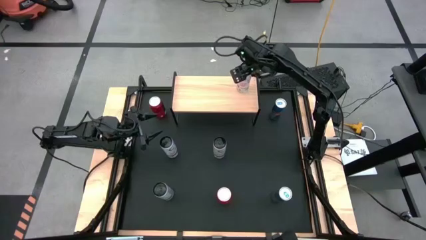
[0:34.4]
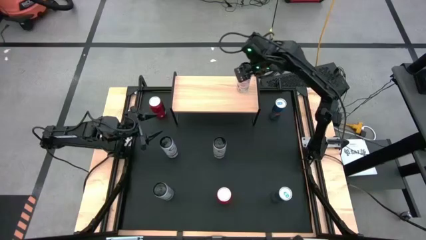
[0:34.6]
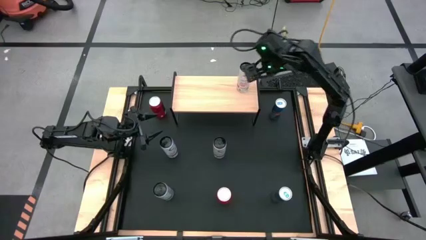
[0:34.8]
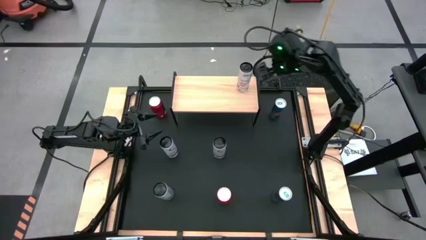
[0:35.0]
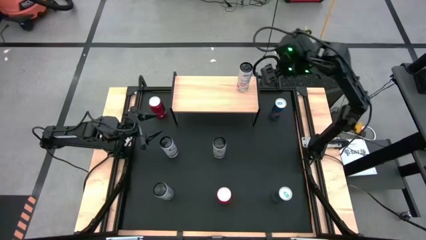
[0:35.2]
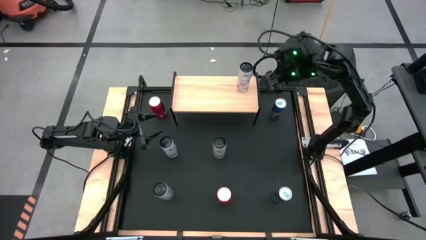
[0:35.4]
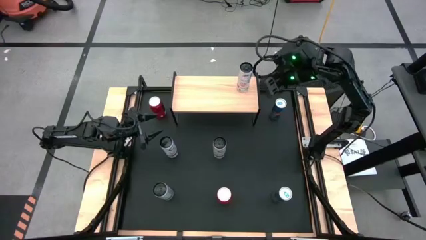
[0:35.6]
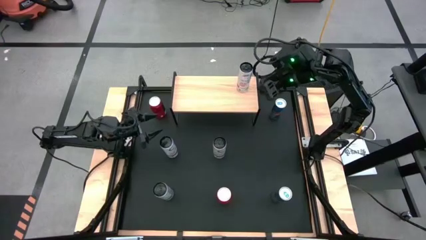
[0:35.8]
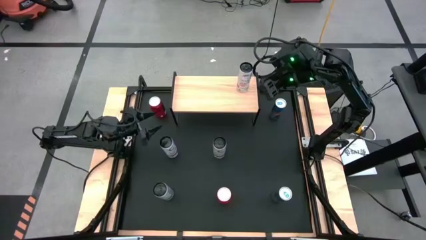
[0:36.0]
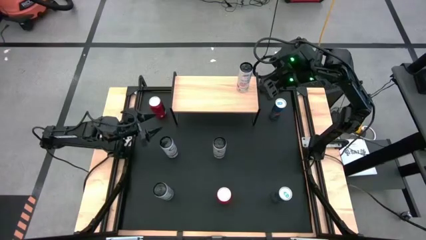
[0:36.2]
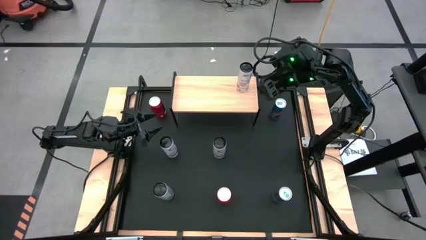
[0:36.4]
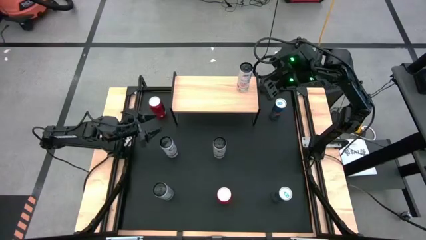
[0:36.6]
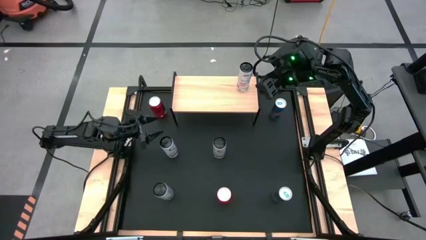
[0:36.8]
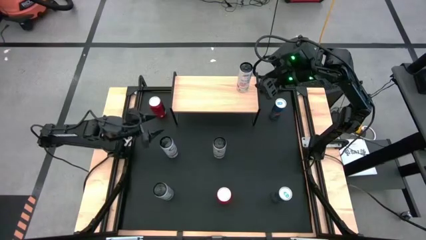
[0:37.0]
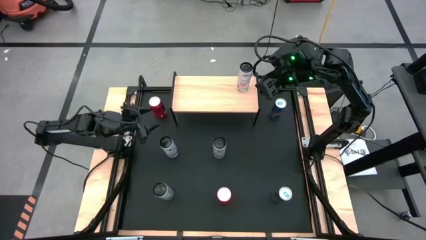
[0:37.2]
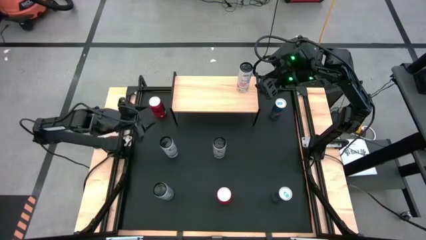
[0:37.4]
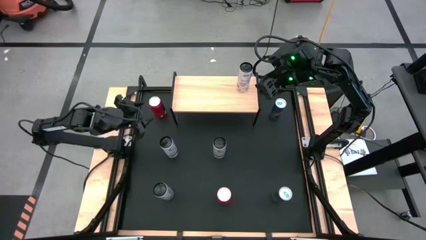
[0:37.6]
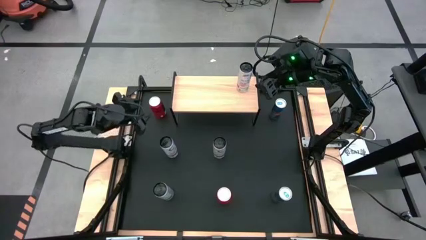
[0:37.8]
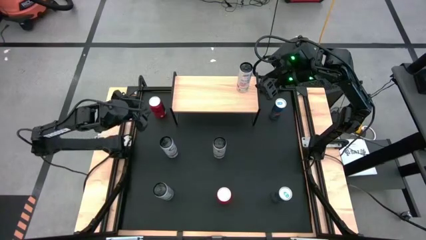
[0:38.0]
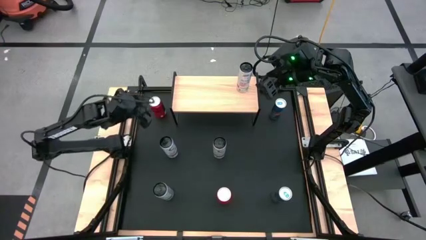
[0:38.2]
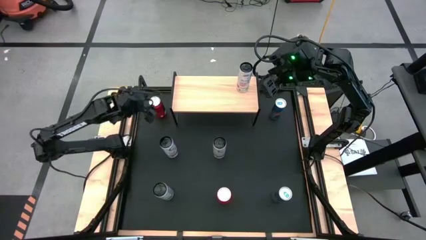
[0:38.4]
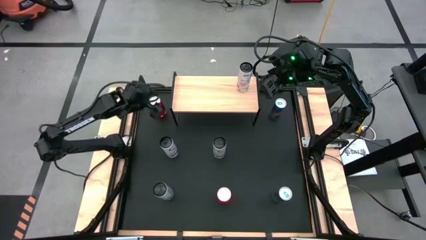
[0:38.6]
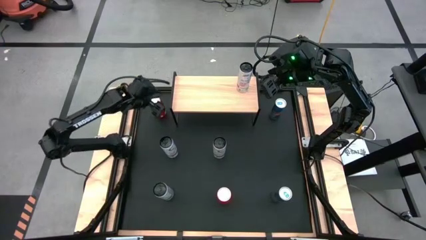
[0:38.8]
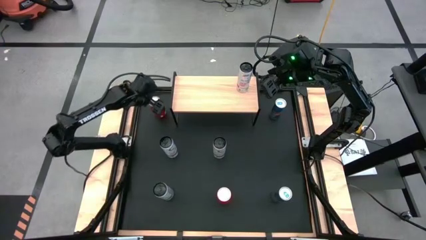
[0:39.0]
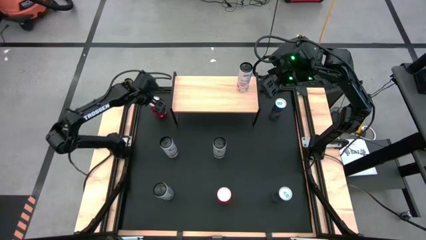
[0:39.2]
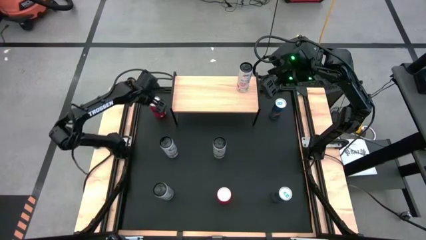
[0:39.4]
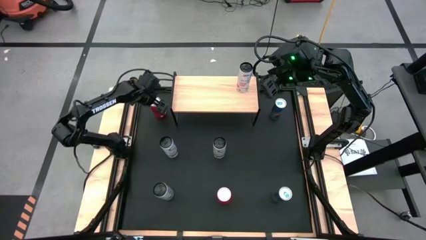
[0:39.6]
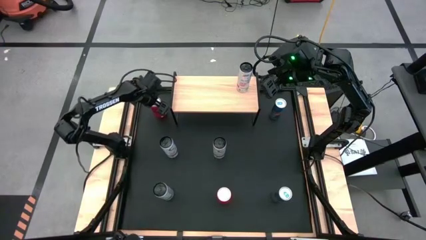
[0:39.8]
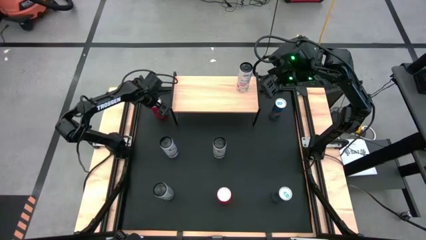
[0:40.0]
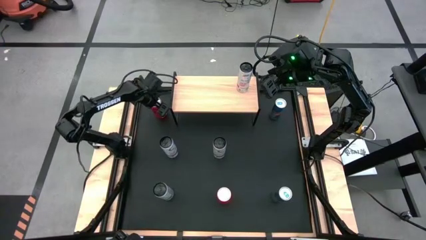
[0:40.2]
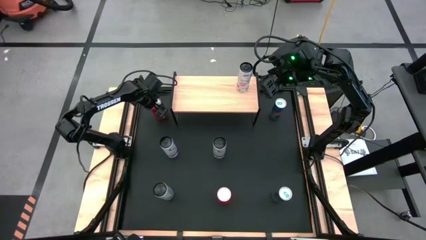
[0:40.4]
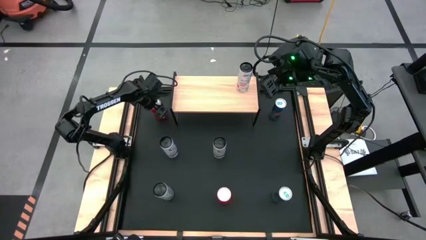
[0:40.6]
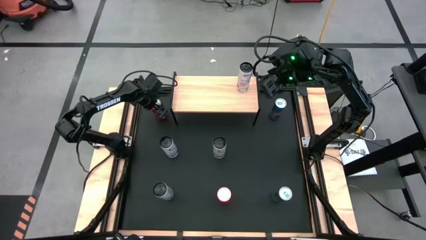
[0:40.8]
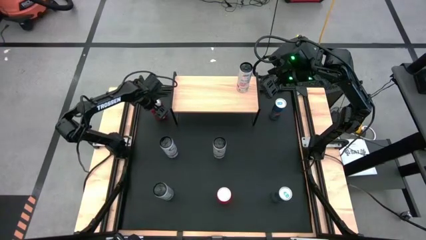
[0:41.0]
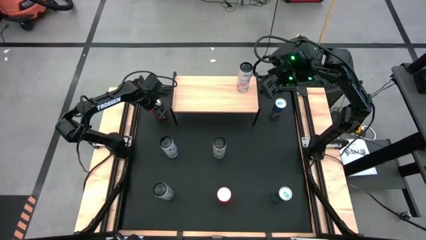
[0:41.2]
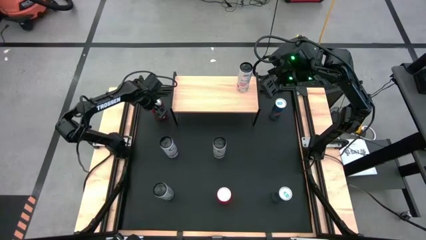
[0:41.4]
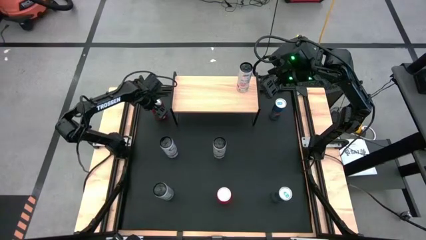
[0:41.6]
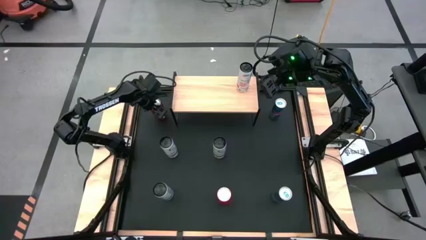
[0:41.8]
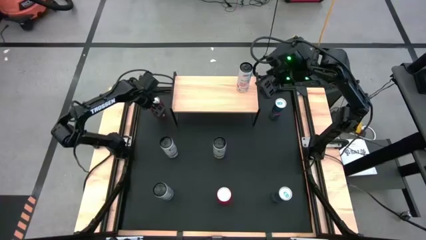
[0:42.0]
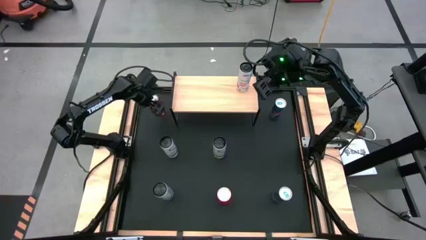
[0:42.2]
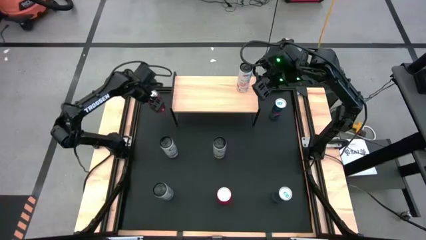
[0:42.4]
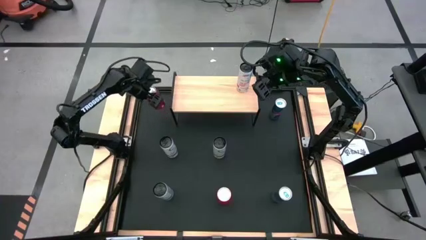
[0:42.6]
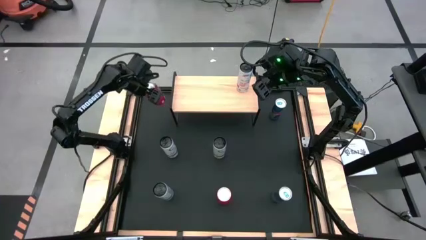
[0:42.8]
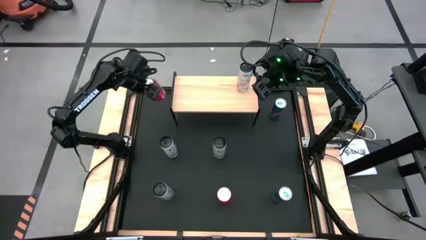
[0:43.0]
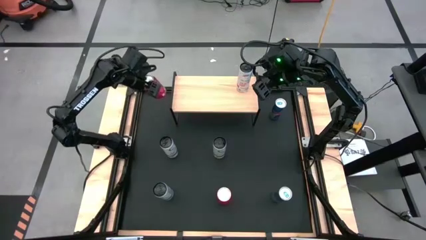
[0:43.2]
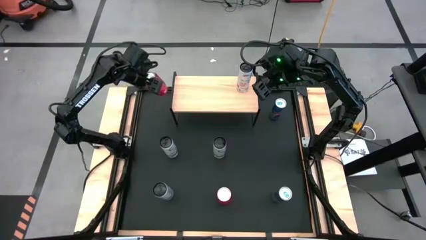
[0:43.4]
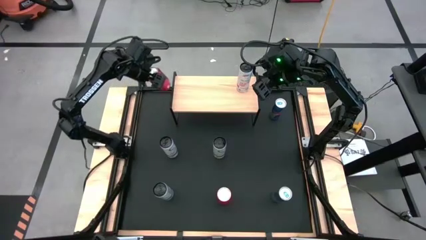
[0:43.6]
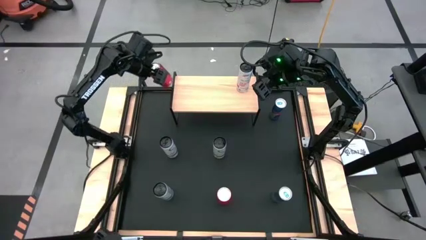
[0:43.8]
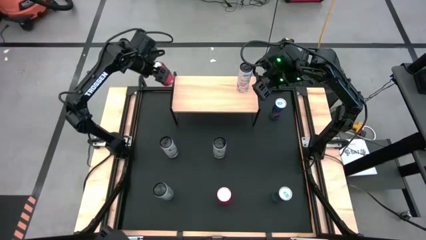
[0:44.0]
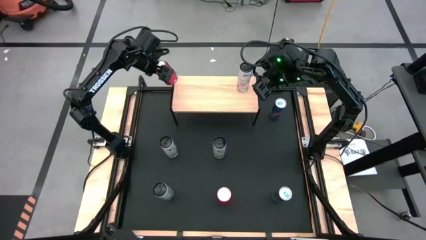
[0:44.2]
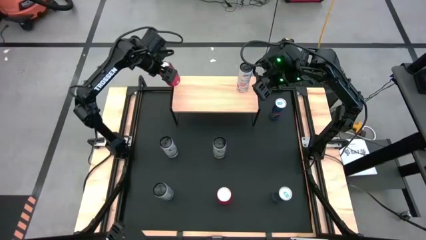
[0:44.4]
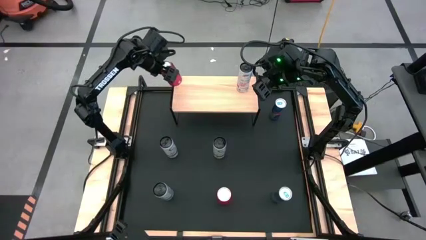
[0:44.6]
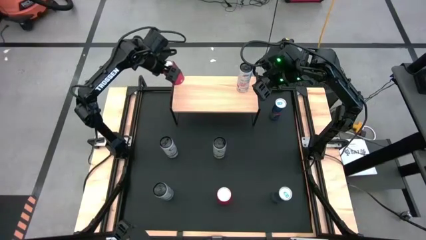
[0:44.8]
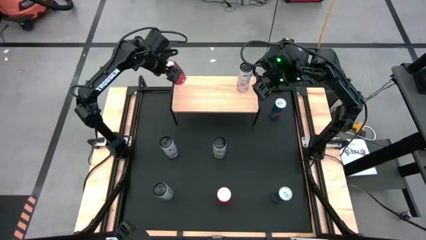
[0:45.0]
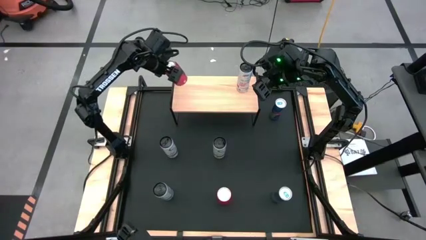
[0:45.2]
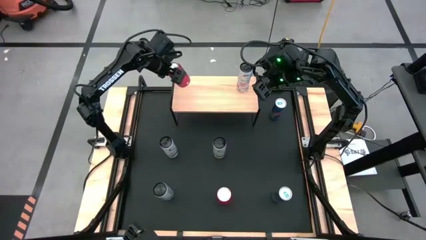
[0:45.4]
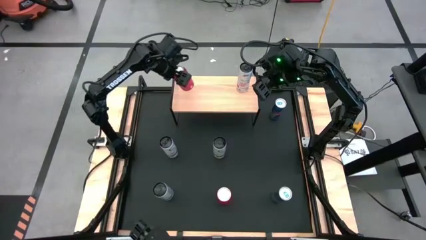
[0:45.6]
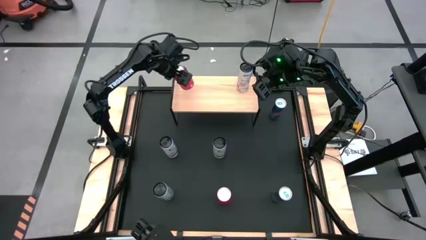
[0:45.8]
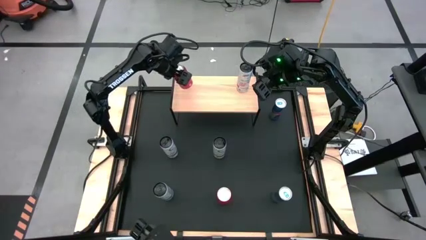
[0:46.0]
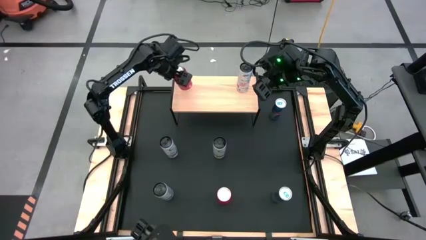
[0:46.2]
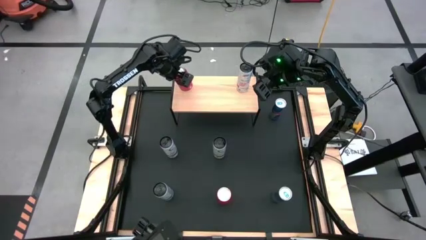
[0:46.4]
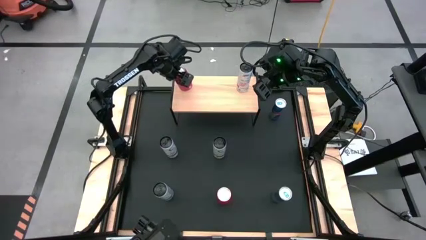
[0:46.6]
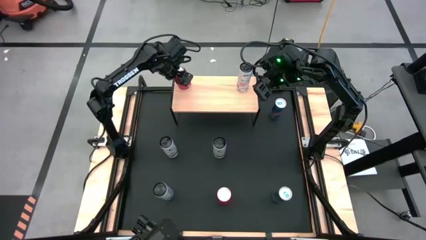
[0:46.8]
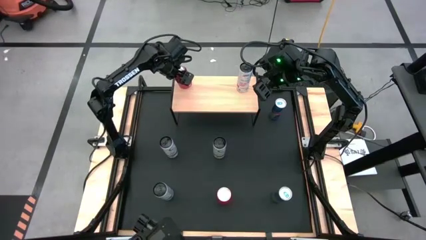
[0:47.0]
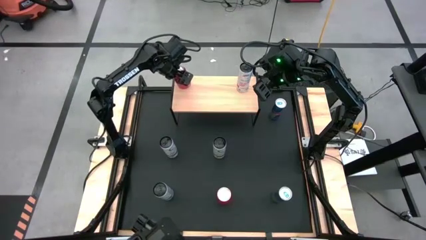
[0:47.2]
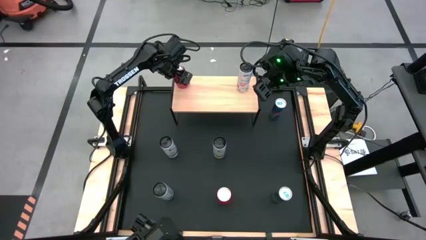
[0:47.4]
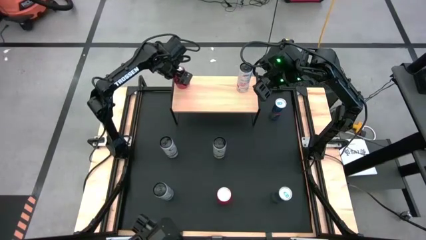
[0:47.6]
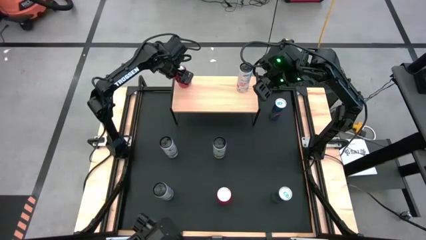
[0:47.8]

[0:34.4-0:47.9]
Task: Place canned beverage on shelf
Put the top red soda can on the shelf

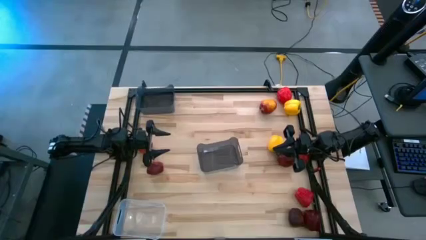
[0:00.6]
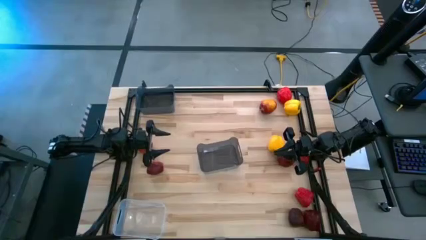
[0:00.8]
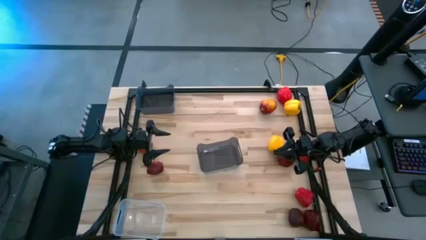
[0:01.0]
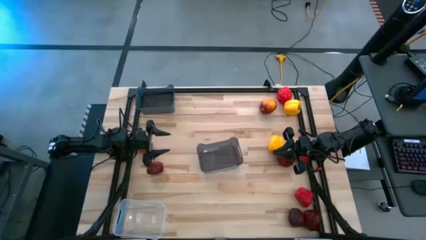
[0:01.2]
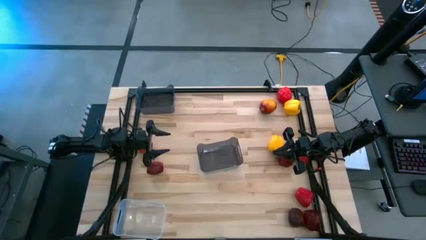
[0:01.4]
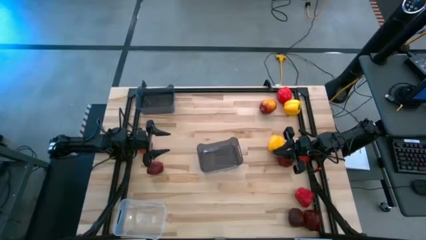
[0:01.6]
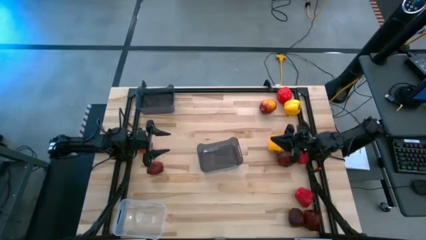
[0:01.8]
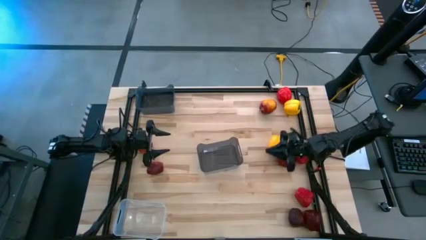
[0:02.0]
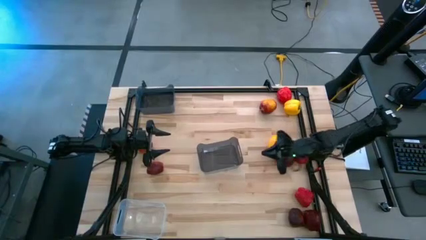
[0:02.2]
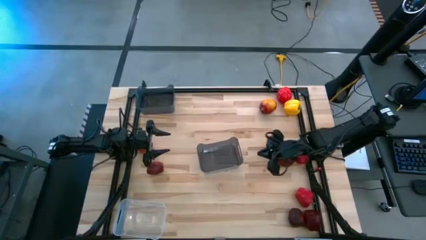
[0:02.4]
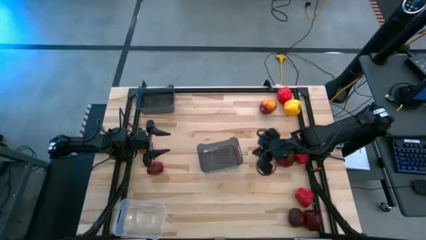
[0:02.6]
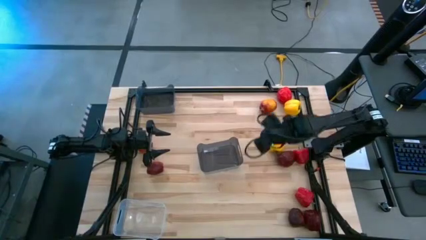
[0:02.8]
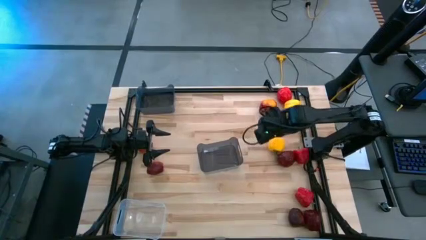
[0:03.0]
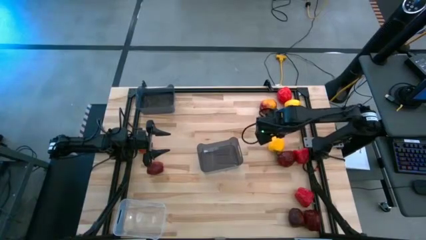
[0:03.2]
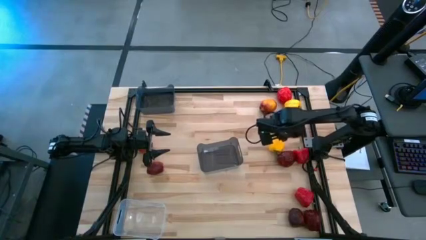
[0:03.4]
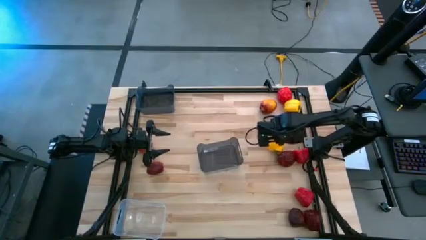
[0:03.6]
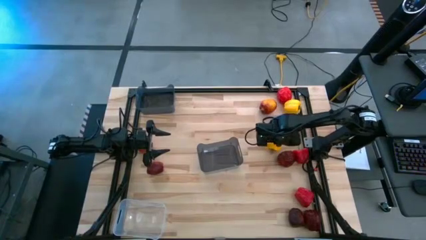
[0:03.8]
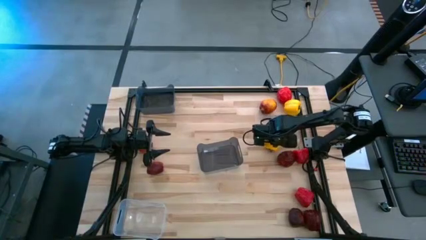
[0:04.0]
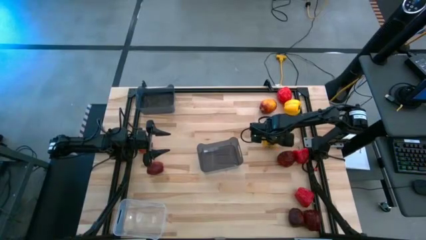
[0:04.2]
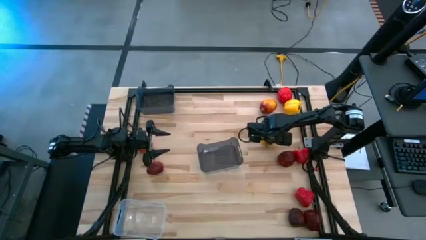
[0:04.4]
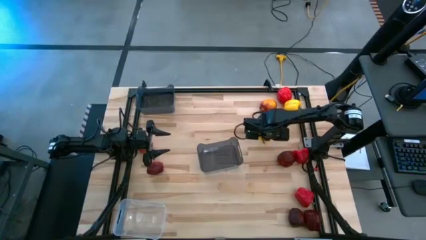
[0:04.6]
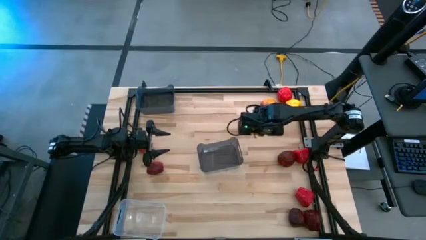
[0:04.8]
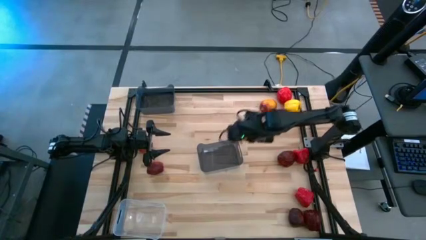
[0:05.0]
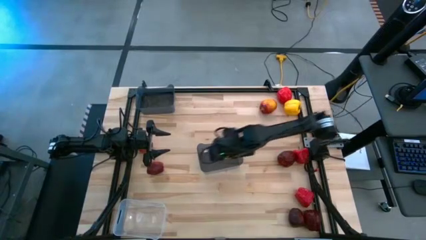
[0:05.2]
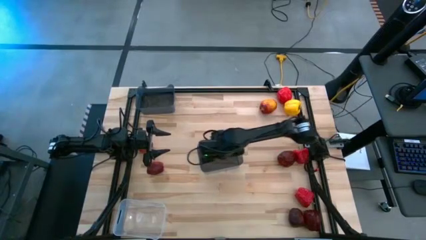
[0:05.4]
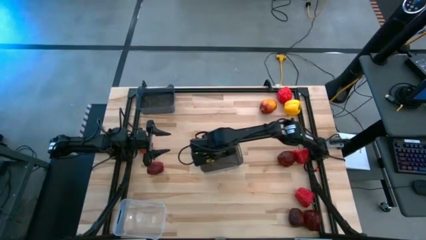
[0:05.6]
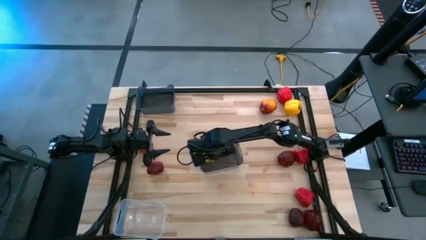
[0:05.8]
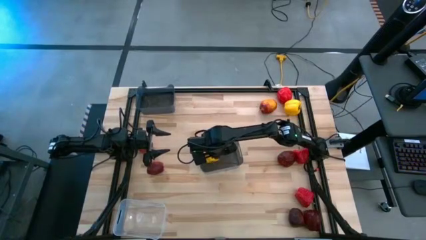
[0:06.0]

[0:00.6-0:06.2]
Task: Sort produce into baskets
Put the bottom yellow bell pepper into the bottom black bin
